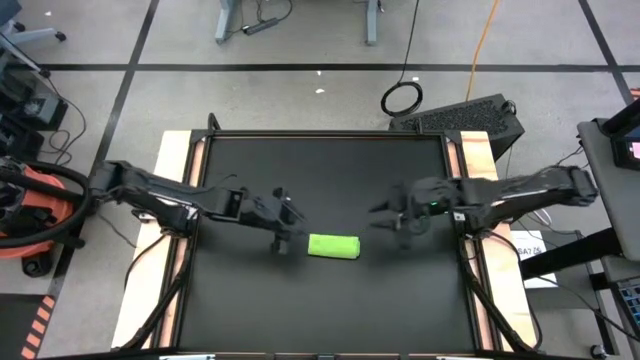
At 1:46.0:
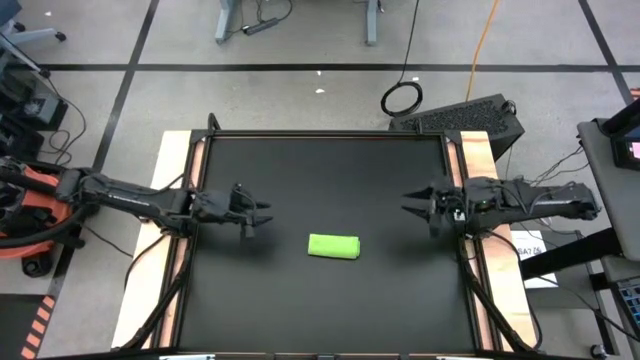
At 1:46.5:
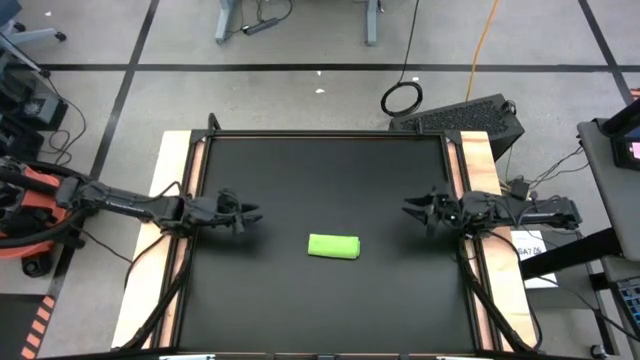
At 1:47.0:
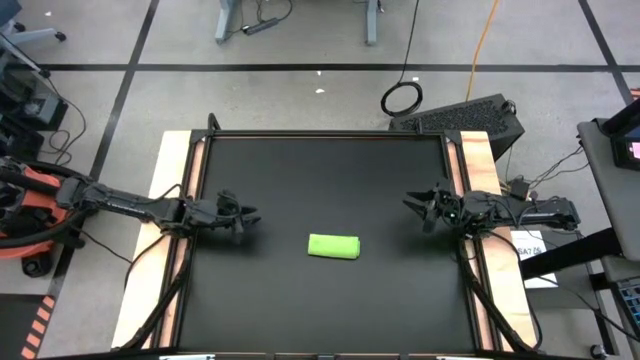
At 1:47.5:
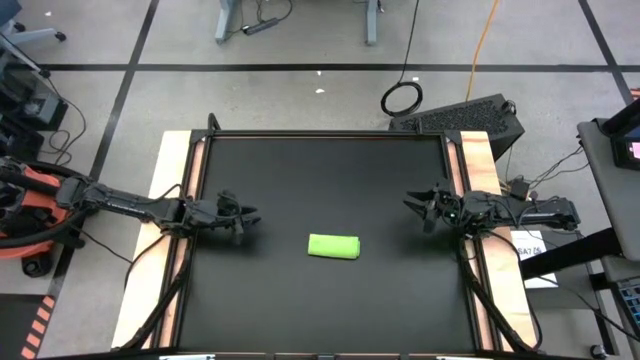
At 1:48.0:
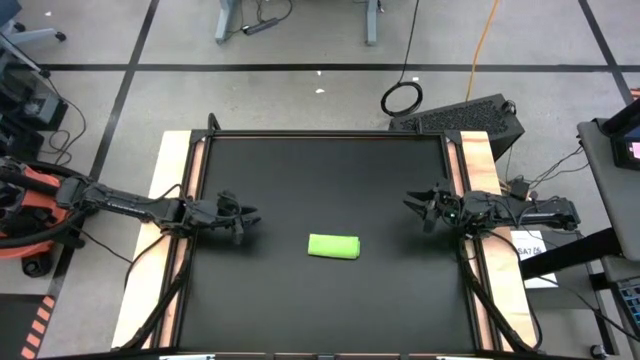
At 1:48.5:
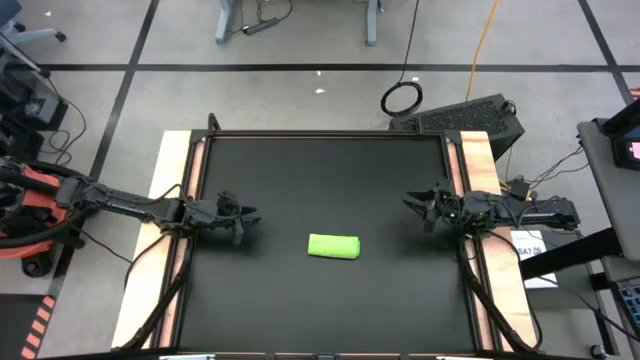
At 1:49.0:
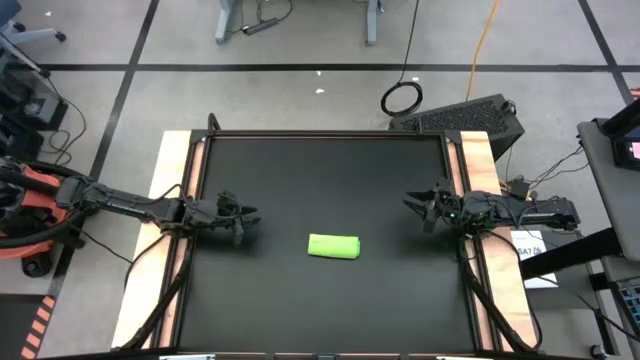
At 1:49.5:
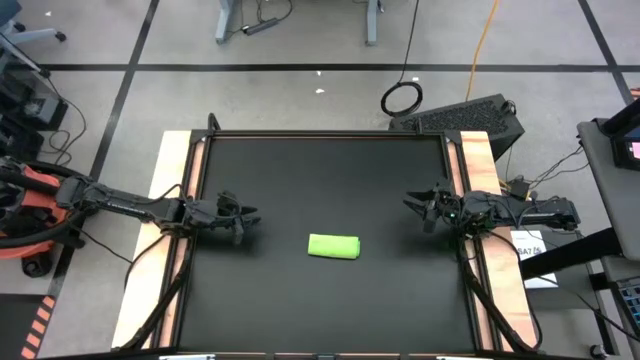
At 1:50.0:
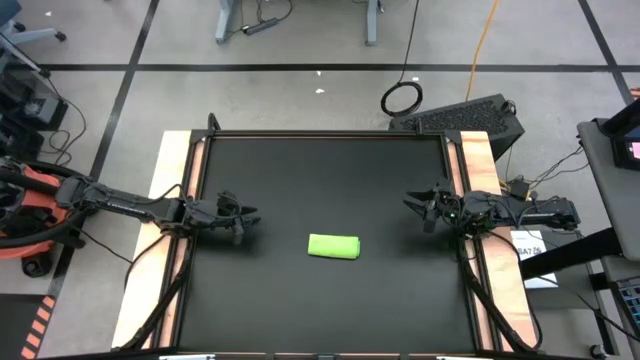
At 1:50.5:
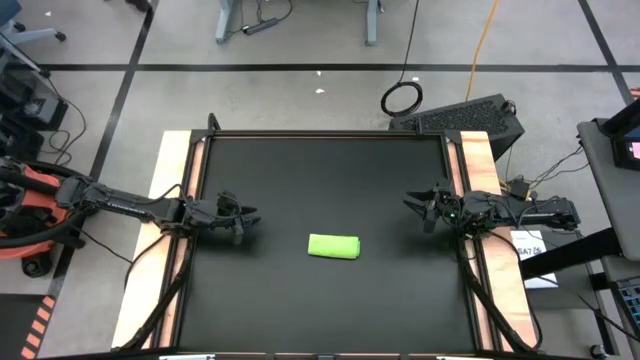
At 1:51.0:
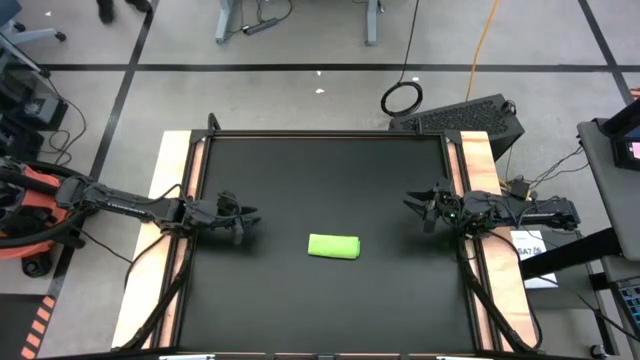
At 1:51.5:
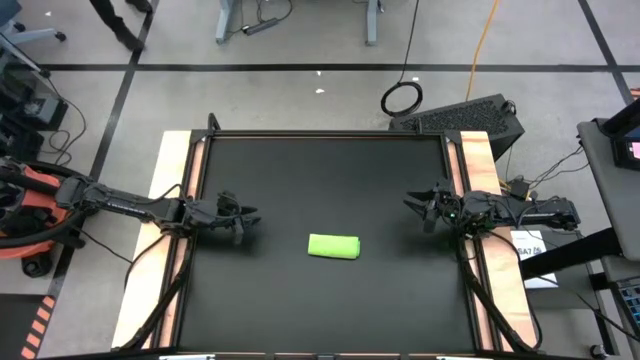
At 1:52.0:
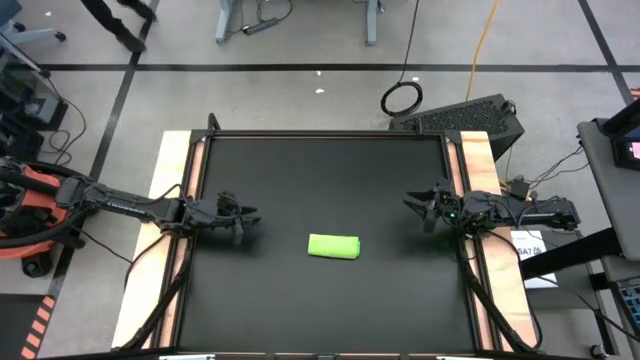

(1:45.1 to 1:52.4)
Task: Roll towel
Return to Home Position

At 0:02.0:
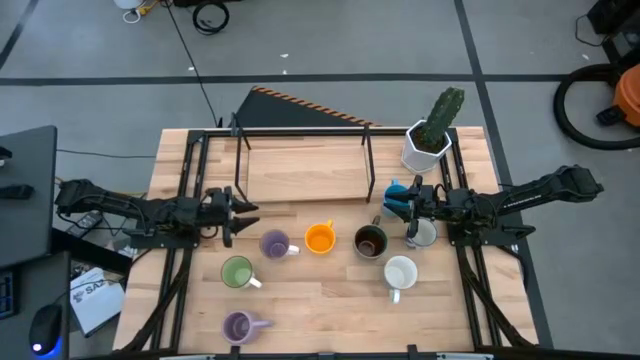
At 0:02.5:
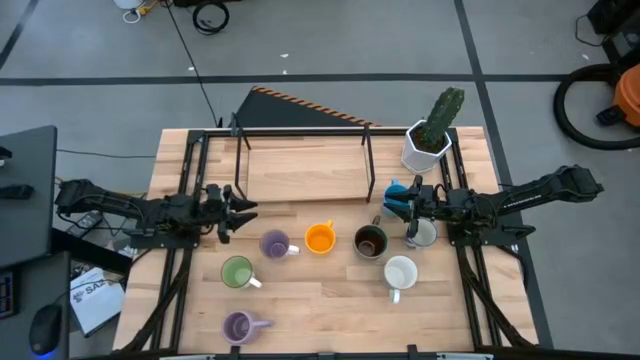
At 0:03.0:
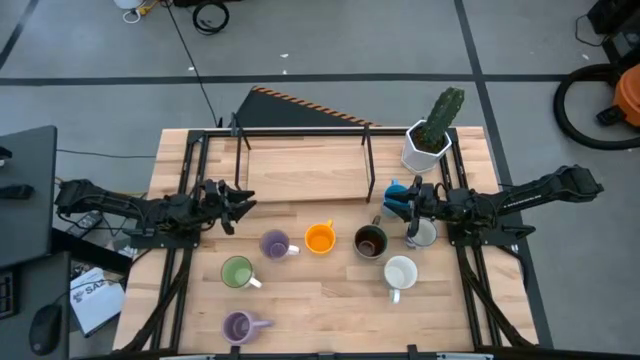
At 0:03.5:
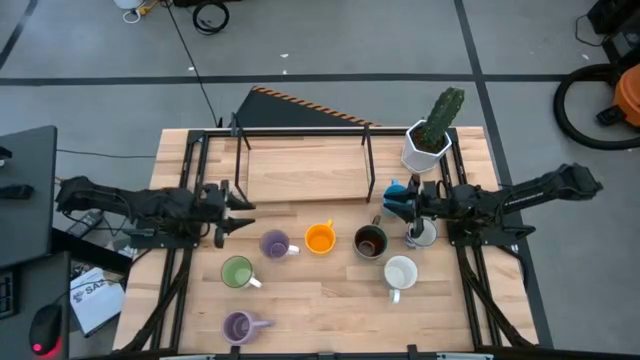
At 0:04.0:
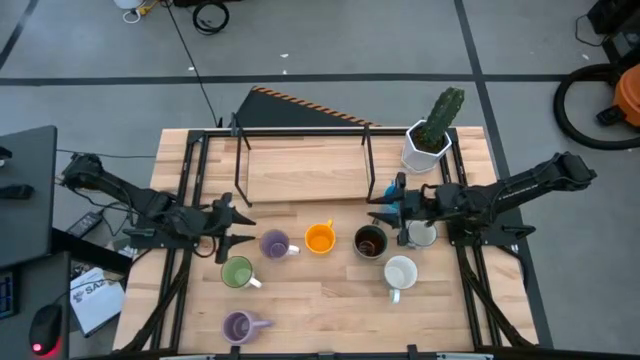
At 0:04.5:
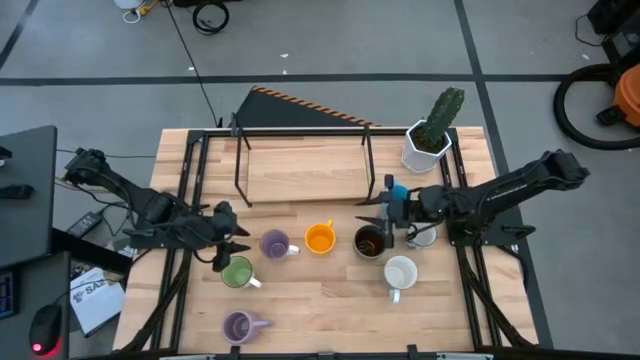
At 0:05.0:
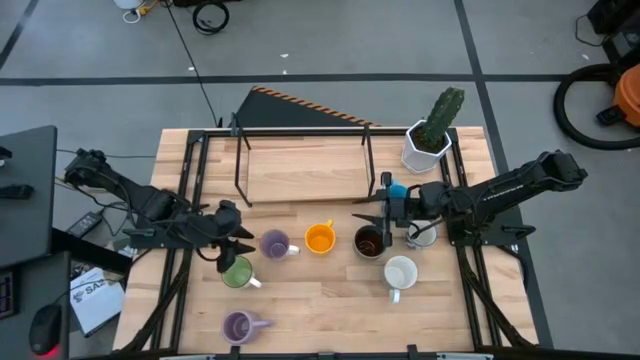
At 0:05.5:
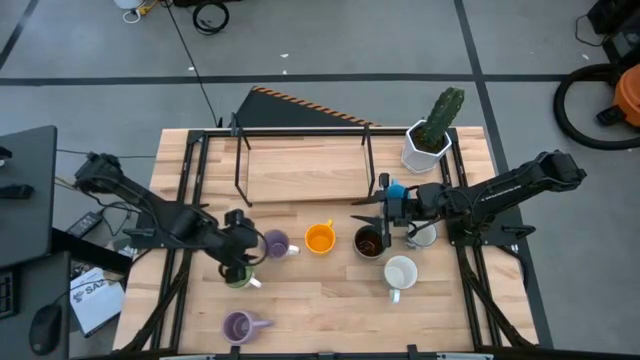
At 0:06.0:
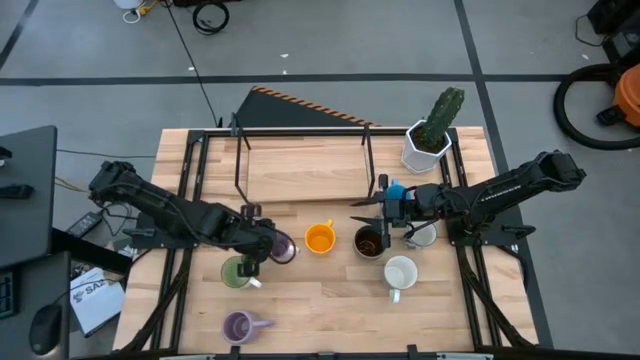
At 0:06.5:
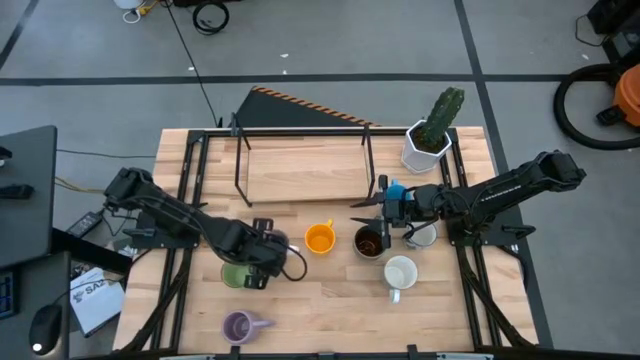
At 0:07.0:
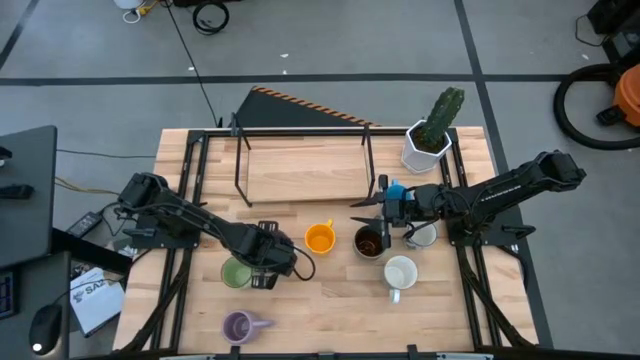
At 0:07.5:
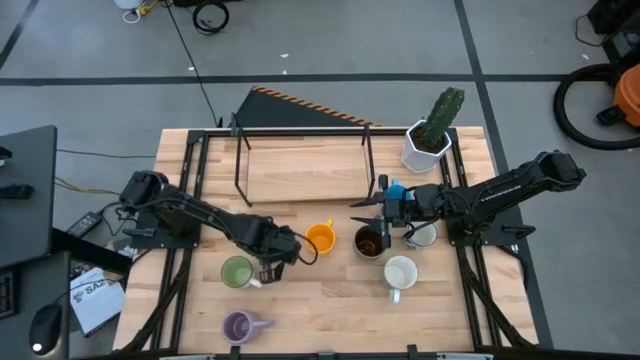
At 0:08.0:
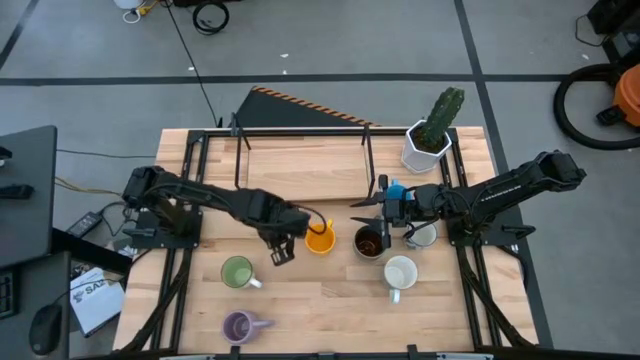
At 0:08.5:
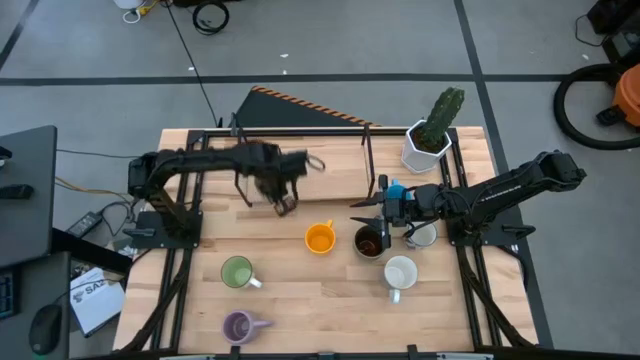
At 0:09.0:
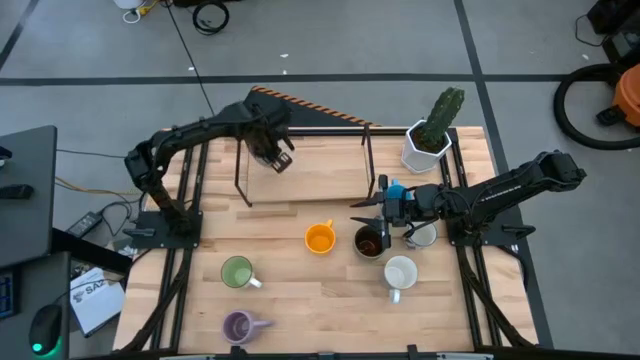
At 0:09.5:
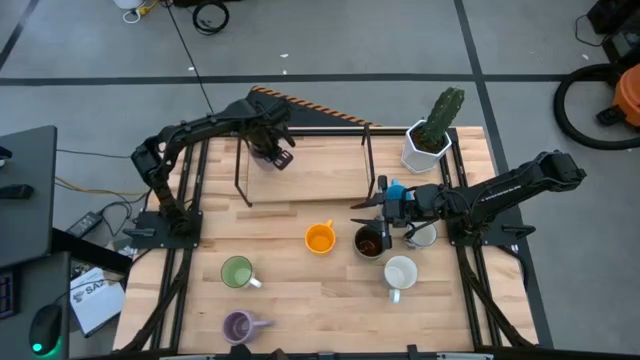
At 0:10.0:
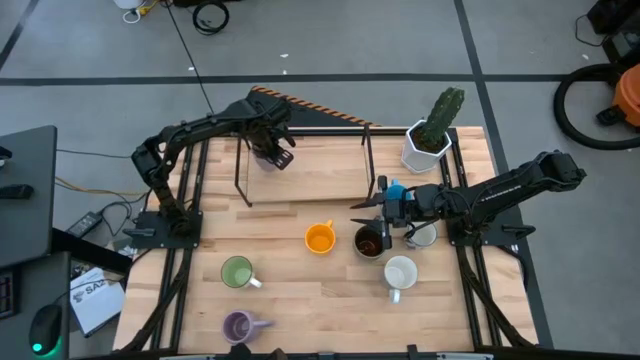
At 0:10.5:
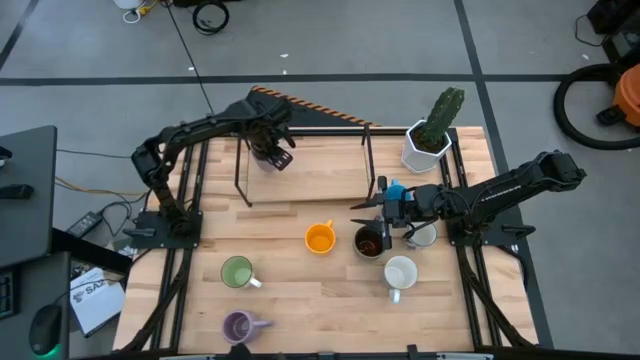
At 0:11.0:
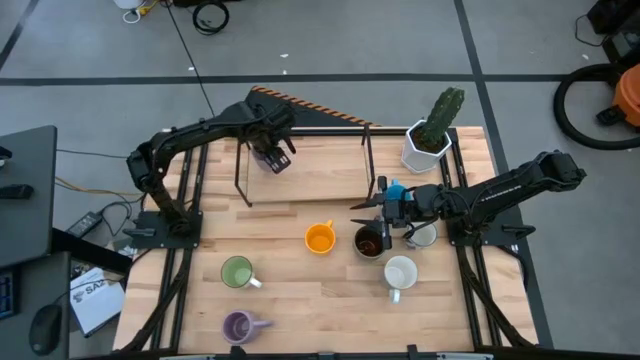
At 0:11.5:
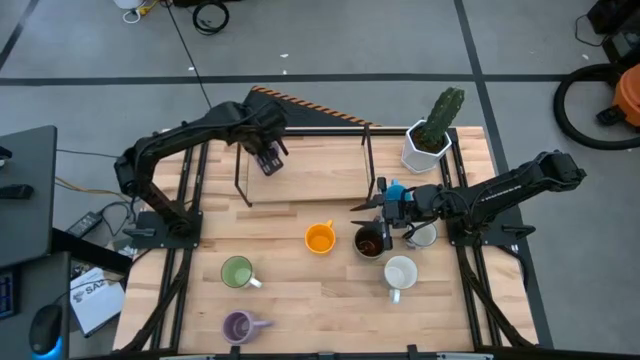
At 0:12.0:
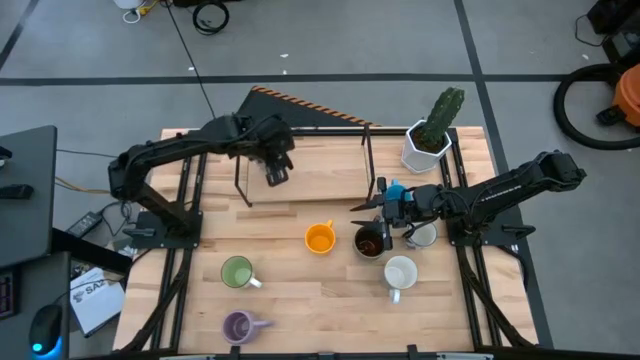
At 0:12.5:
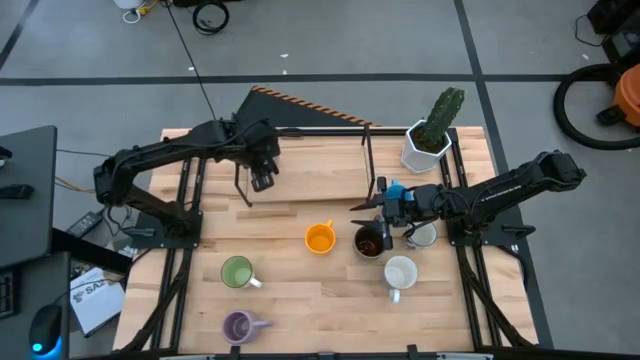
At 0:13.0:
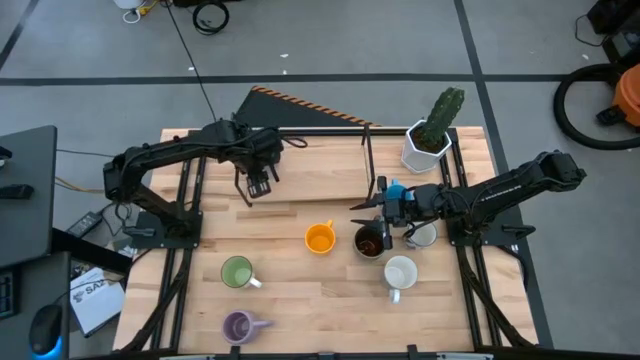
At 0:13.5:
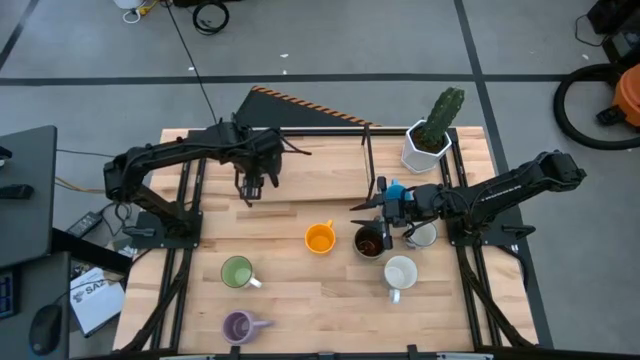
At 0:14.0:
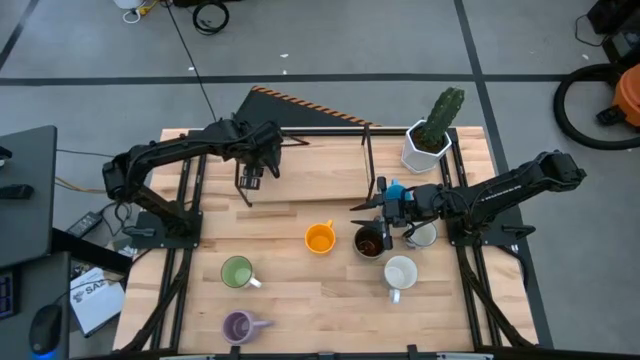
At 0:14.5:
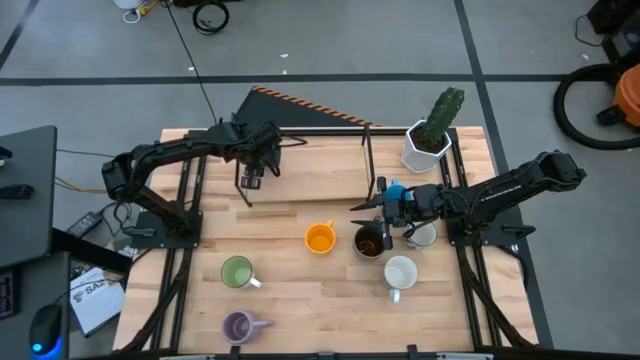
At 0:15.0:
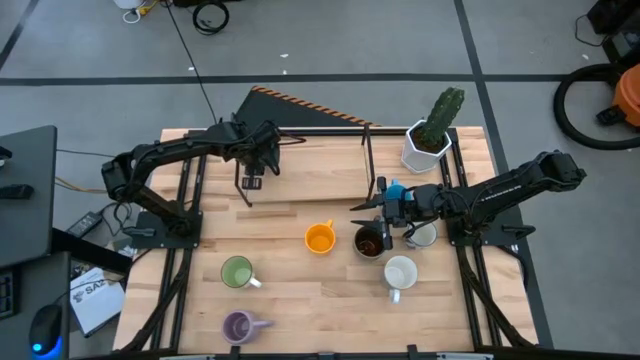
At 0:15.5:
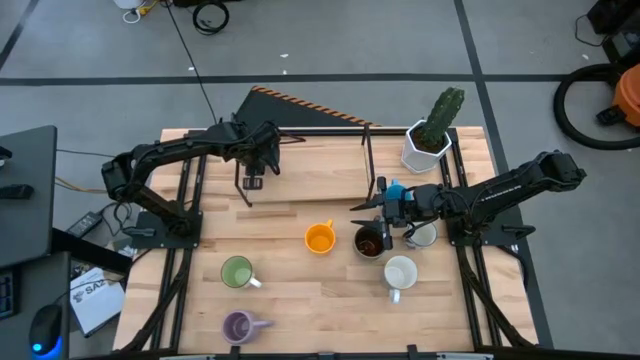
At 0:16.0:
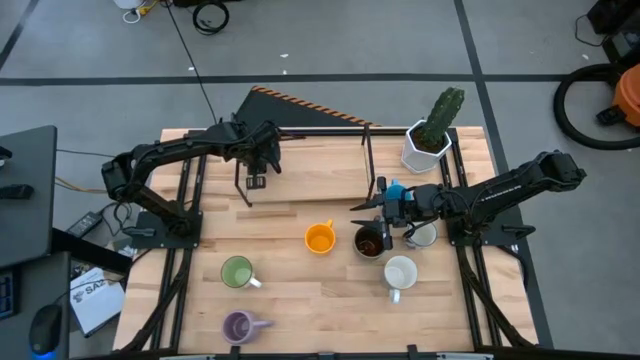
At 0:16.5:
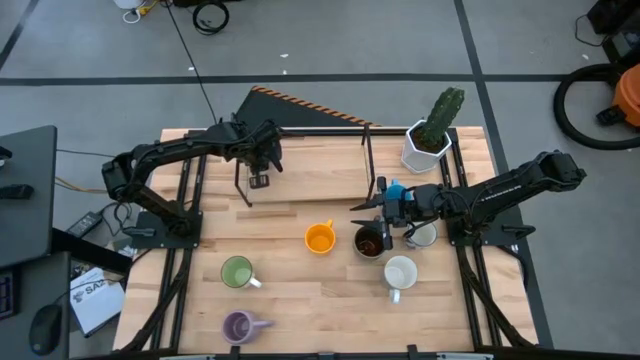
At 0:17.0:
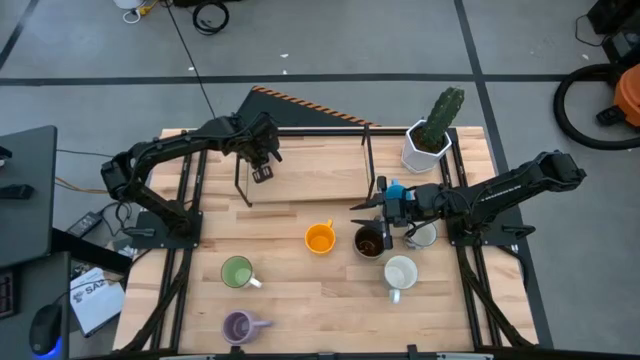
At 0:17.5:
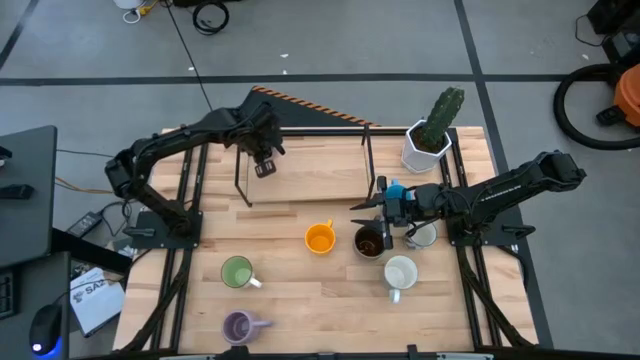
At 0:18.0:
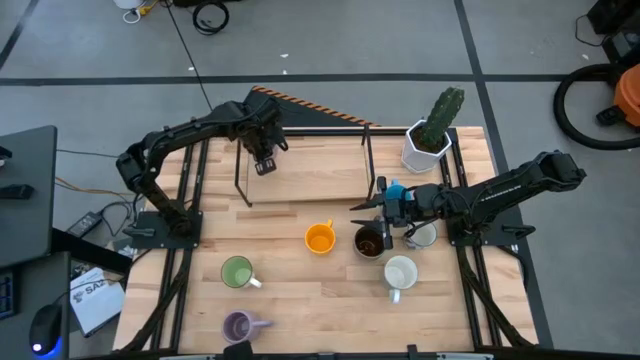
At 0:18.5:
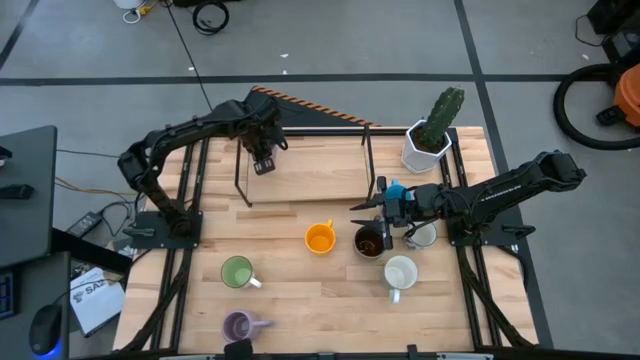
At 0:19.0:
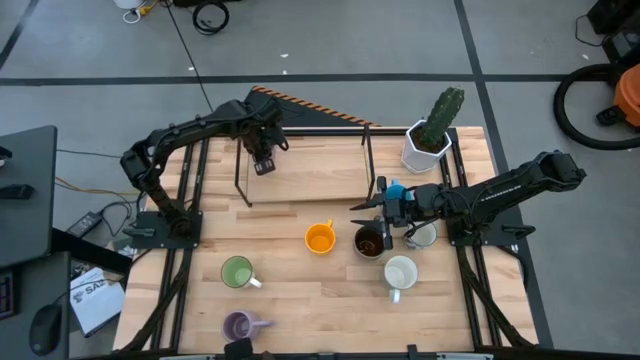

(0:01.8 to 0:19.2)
Task: Place coffee mugs
Put the top purple mug on the shelf
